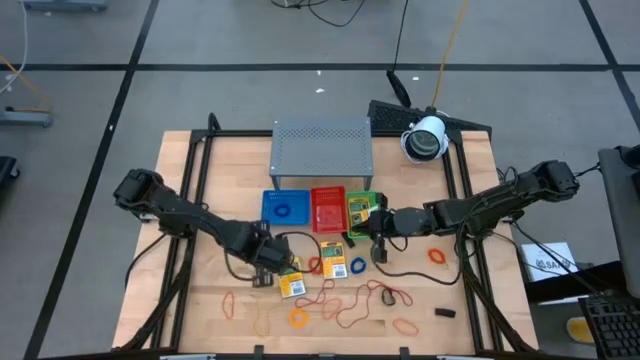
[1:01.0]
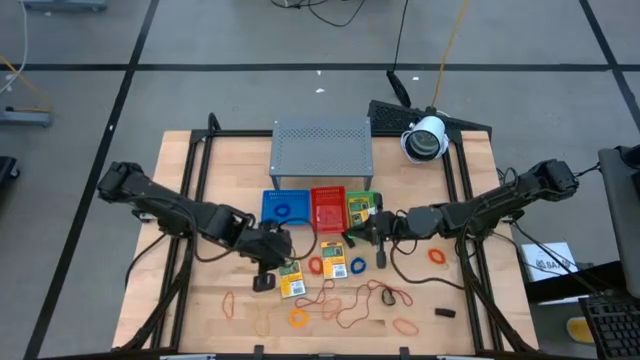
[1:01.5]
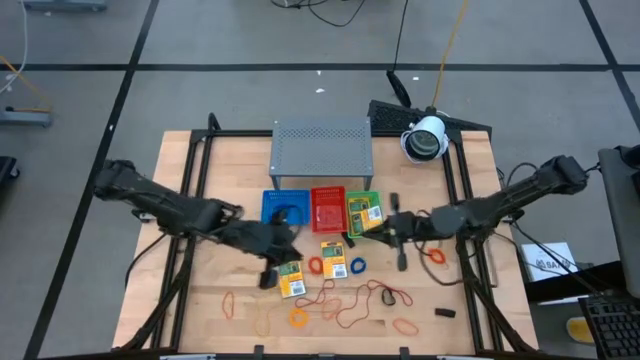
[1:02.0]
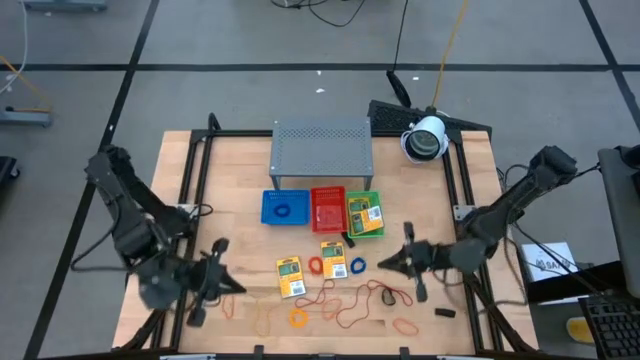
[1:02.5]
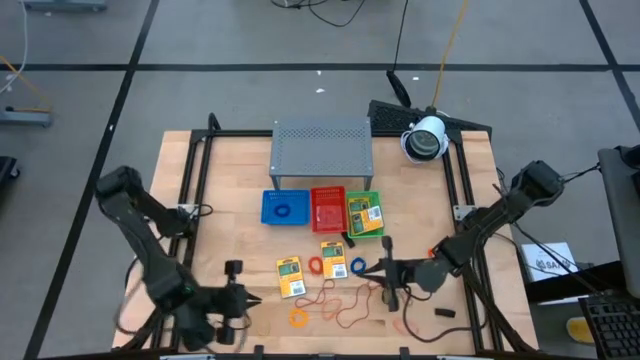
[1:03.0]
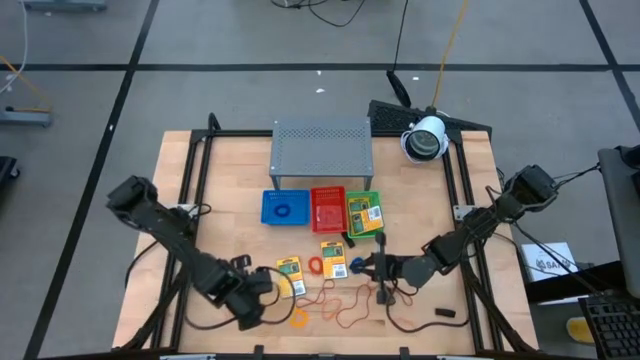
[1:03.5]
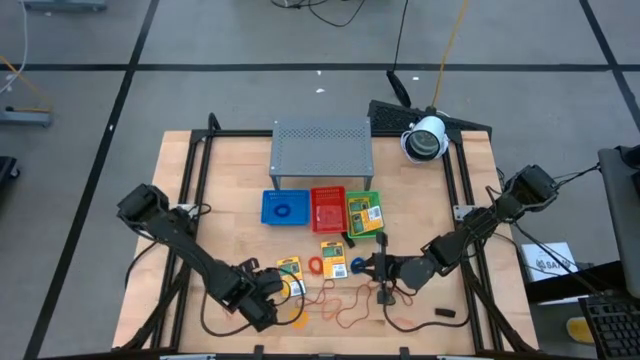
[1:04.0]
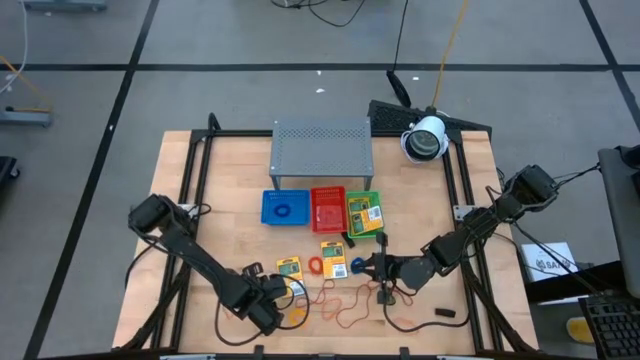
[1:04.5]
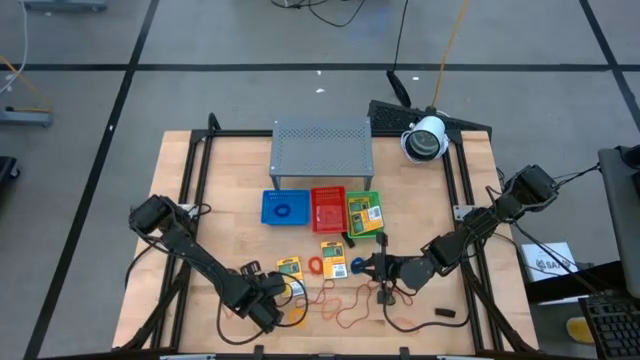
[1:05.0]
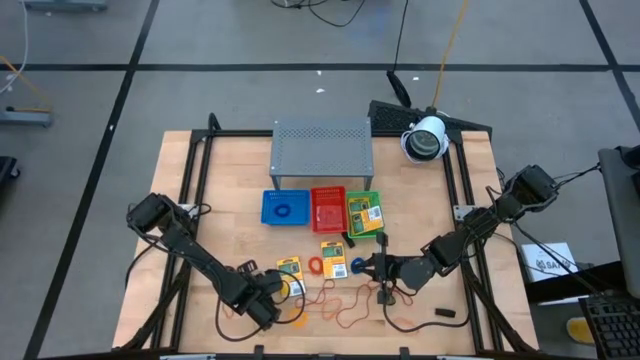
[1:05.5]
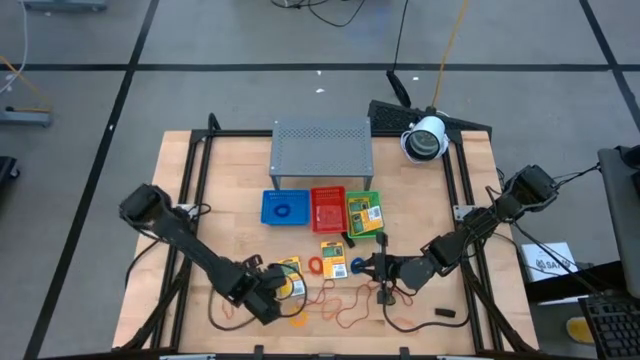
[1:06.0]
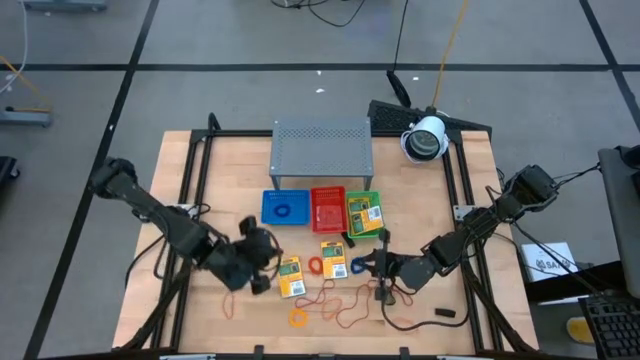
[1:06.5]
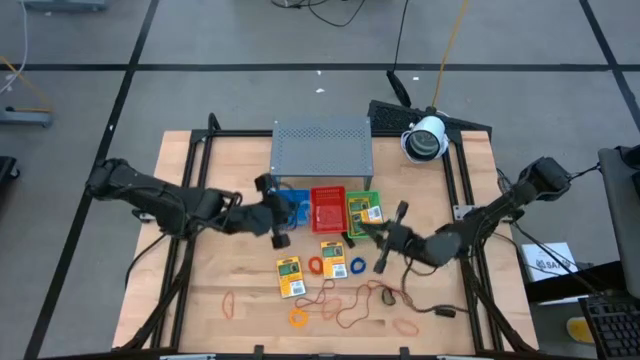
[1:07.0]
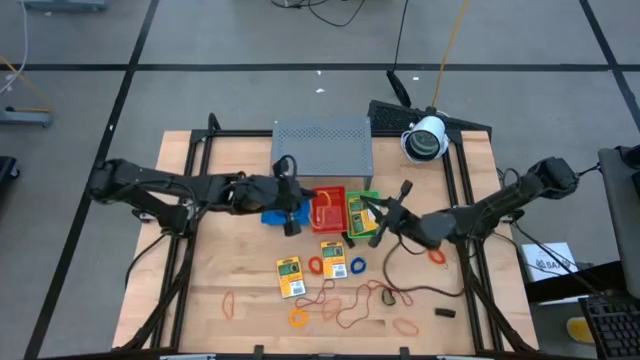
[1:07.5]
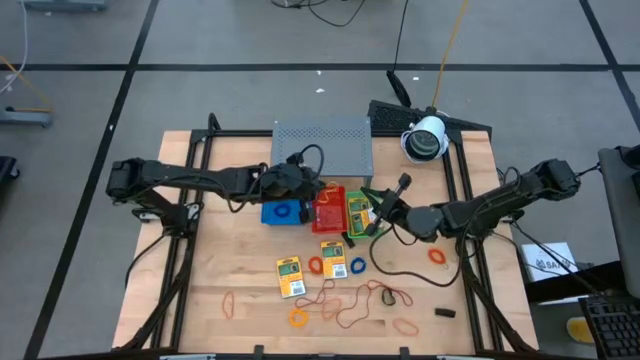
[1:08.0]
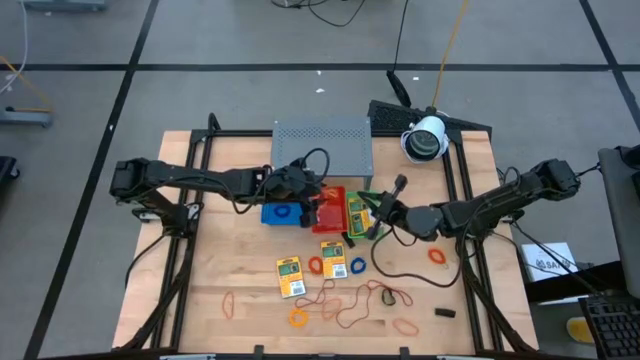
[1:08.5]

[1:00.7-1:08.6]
Task: Pick & Place Office Desk Supplies
Put the yellow rubber band into the red bin

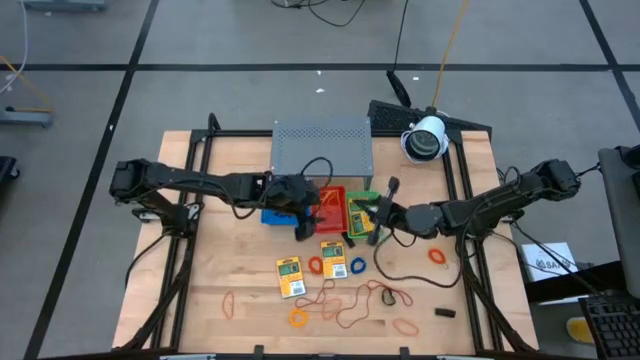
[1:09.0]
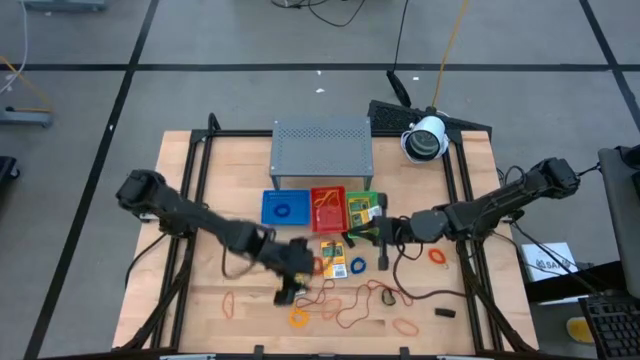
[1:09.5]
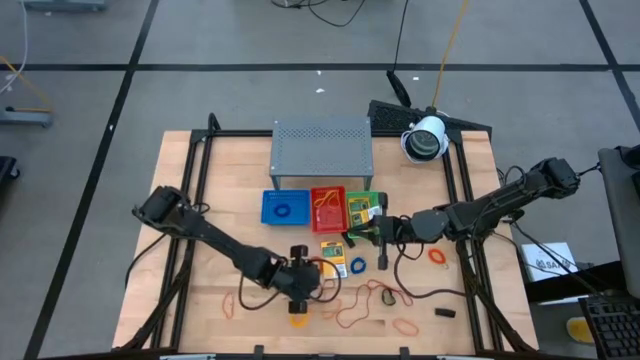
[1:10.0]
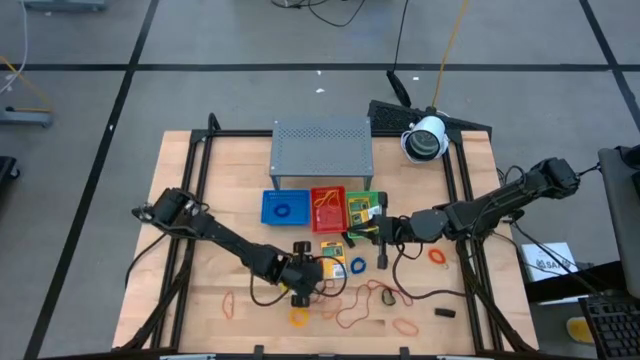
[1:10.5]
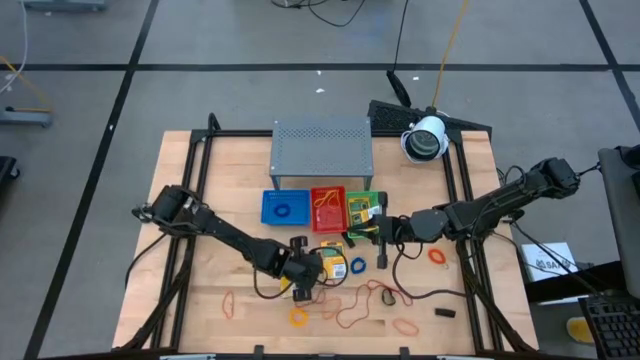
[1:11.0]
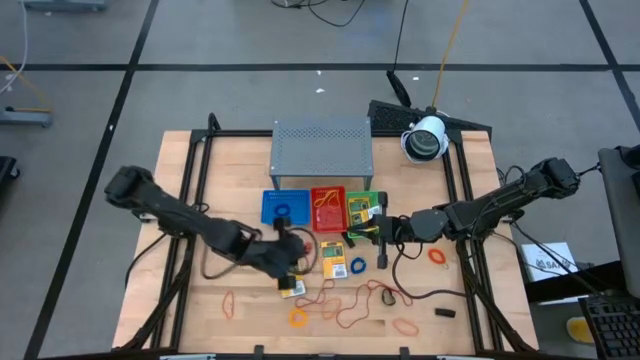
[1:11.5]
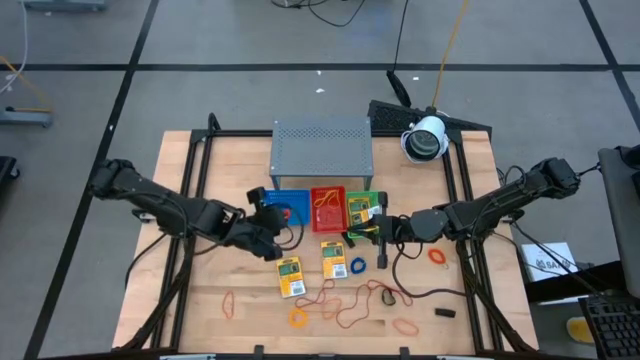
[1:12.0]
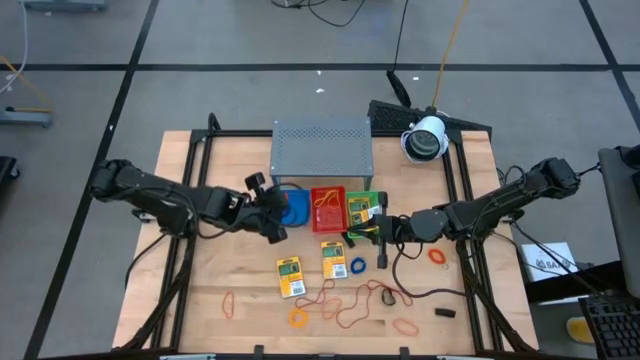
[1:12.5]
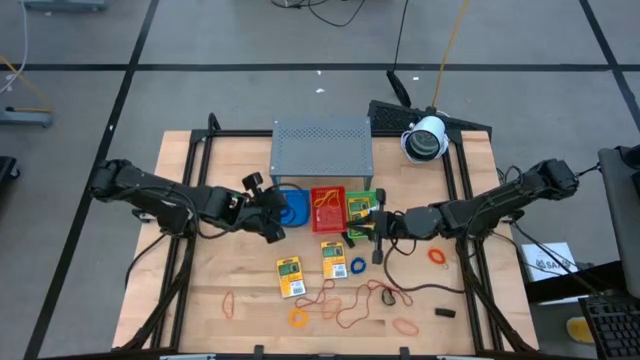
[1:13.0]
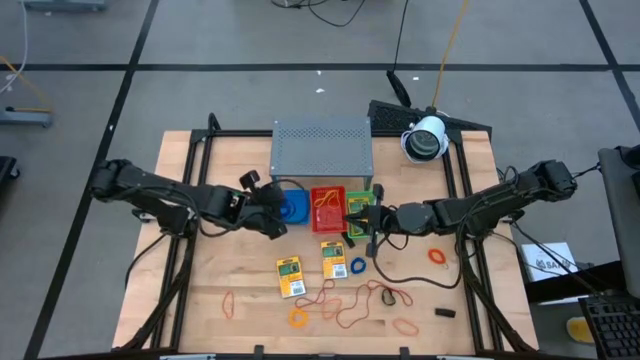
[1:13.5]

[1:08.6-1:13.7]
Put the orange spring keychain into the blue bin

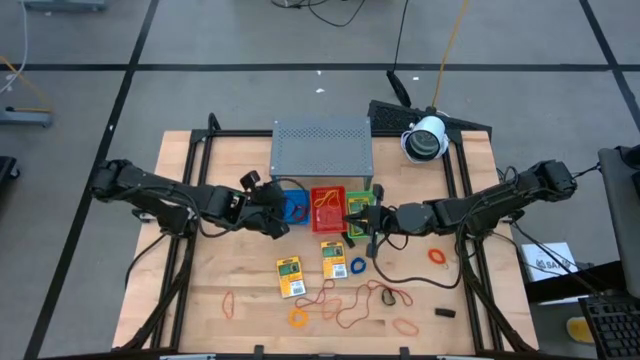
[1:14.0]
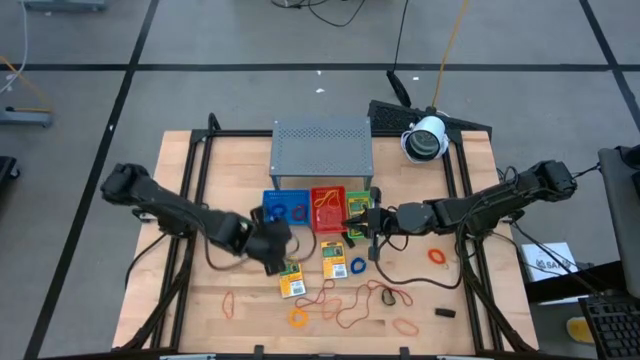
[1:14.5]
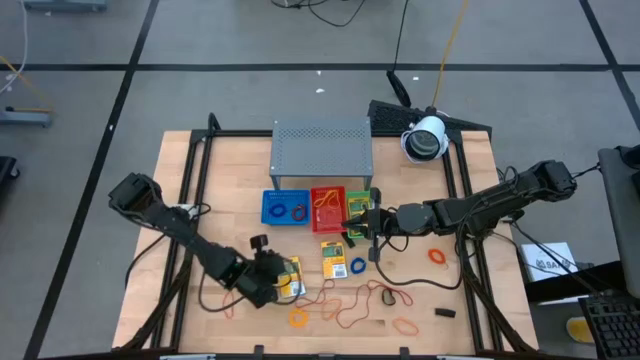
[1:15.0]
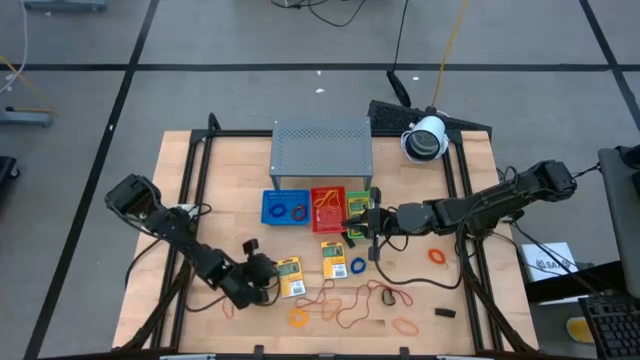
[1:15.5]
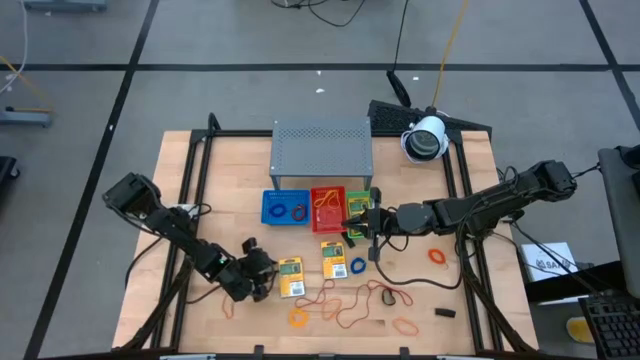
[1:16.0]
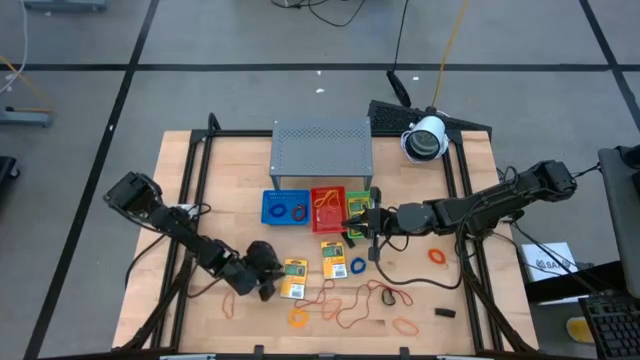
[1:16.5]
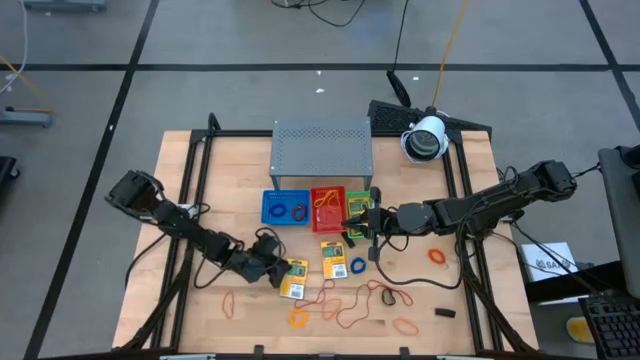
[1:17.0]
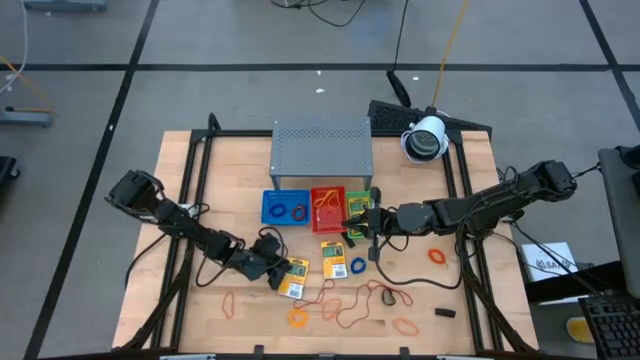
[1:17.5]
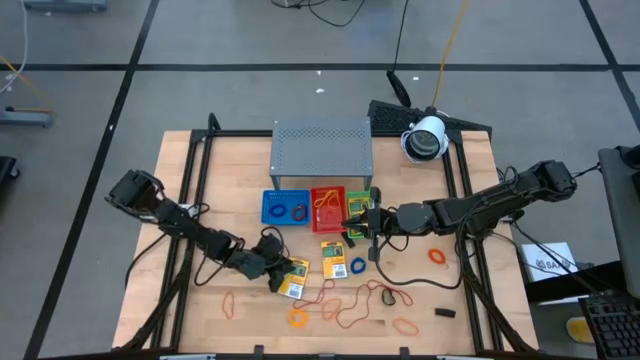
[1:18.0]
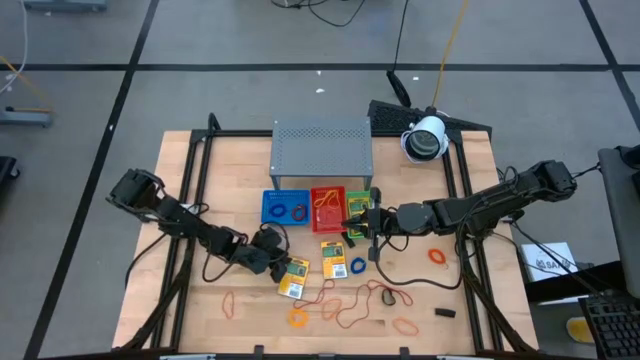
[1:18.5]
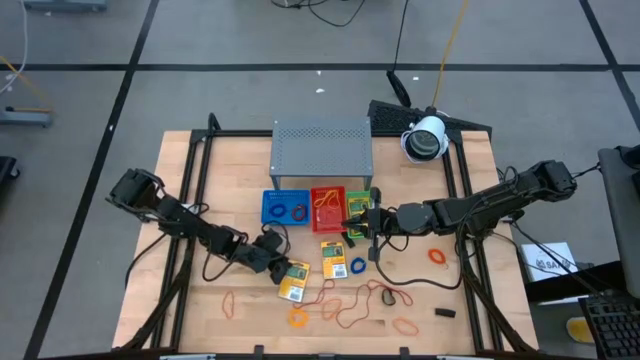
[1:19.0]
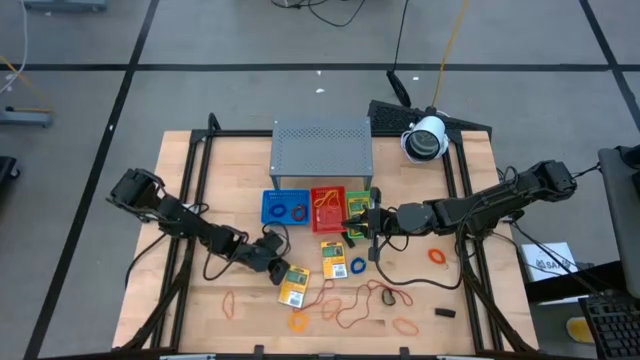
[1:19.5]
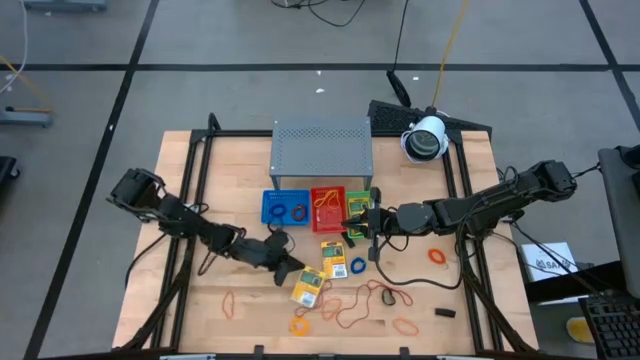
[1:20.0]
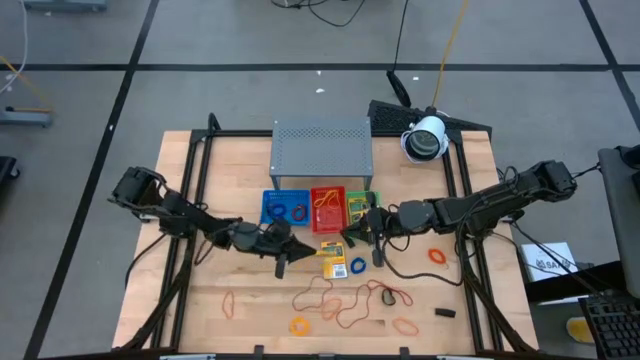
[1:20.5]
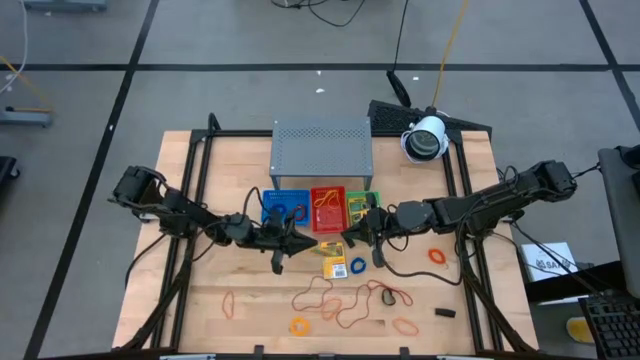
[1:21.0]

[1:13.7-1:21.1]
Put the crayon pack into the green bin

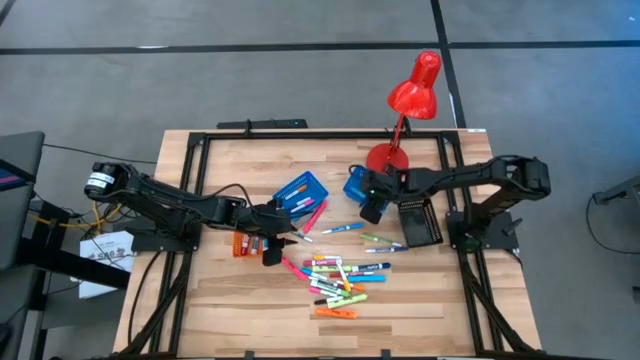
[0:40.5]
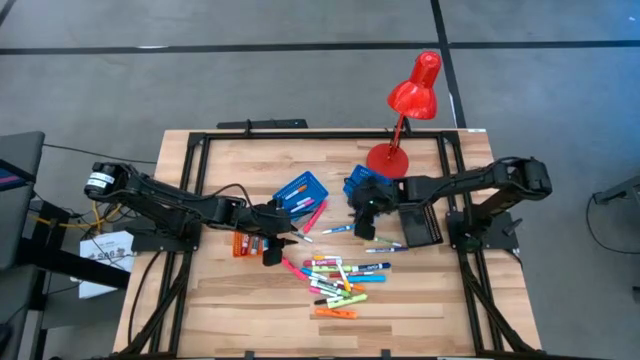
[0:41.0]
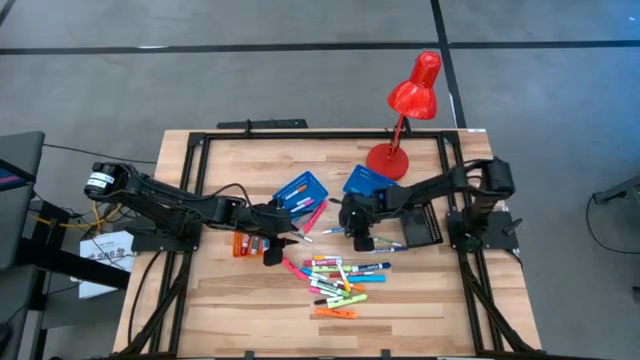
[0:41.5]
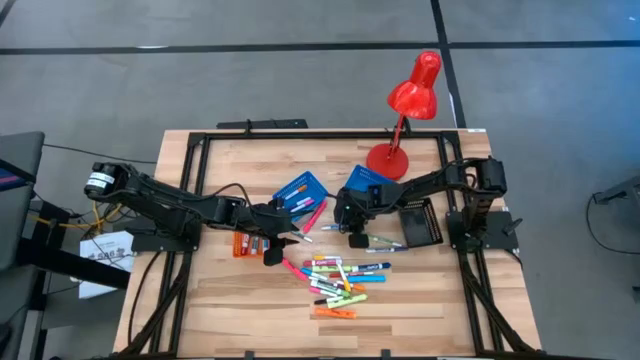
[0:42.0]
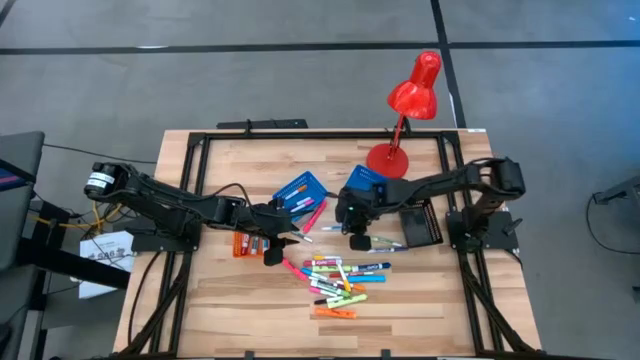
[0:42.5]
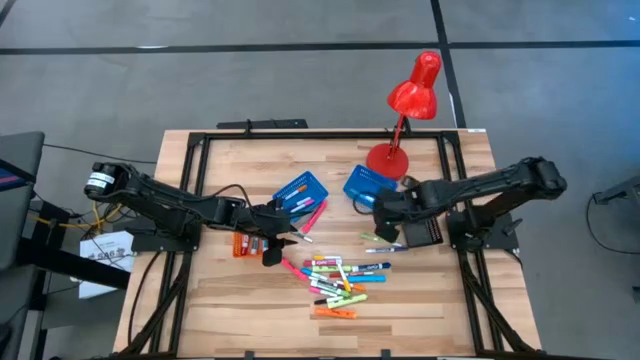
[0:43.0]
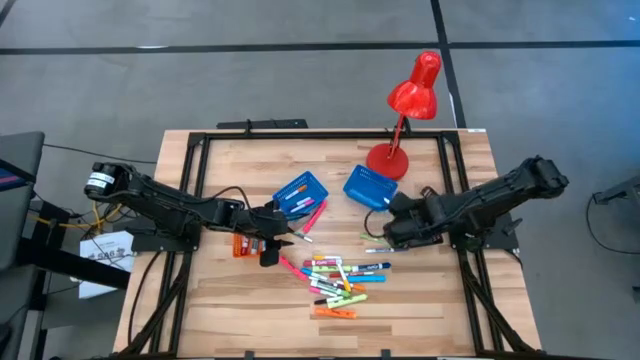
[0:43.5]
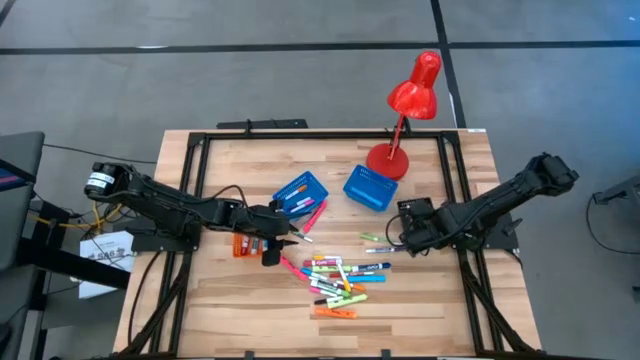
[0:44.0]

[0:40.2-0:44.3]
Task: Pick & Place Markers
Put the small light blue marker pen into the black bin
